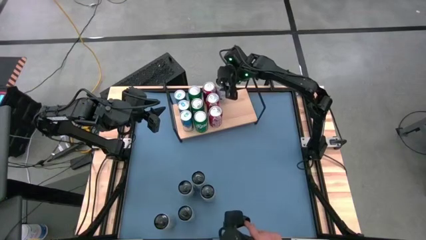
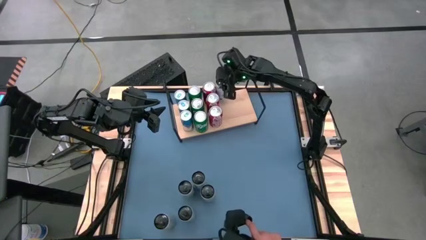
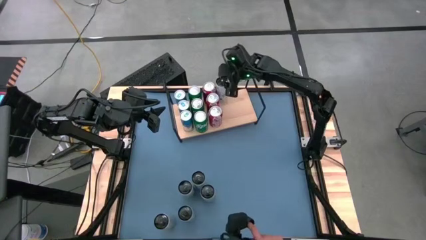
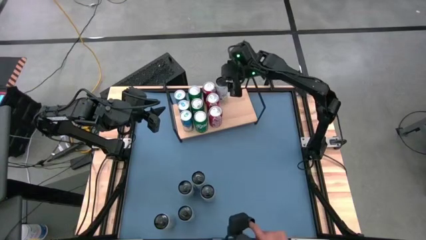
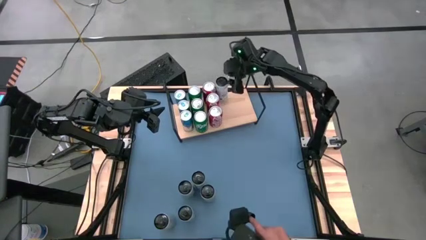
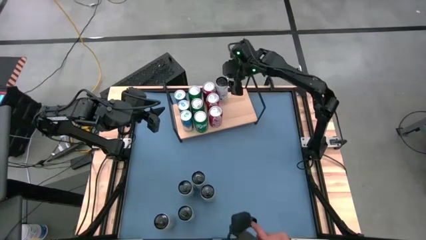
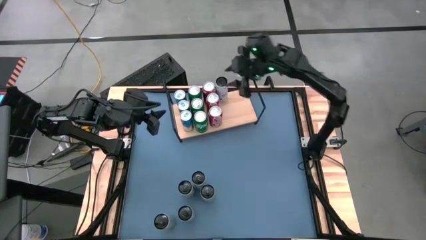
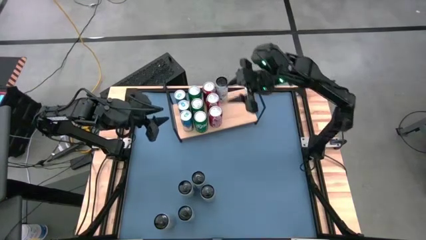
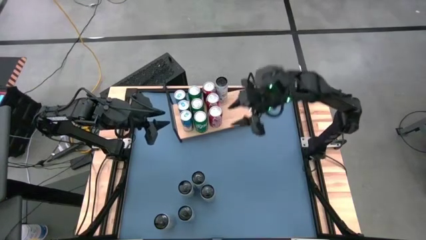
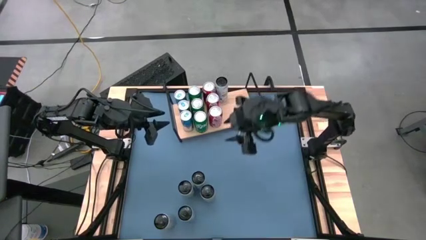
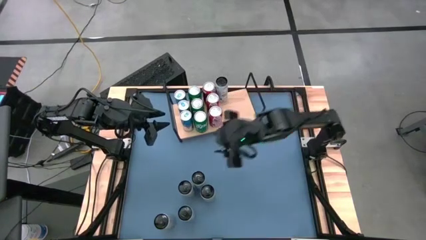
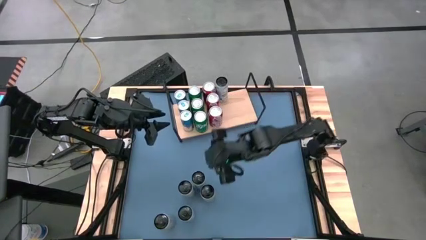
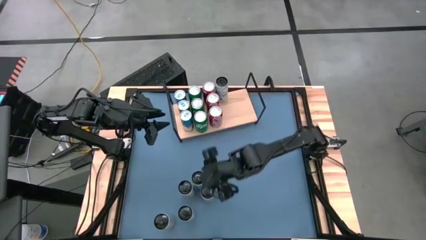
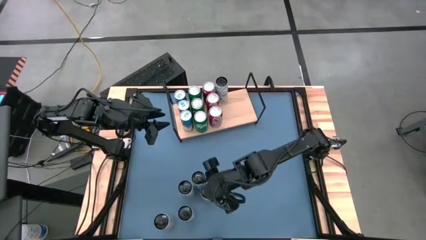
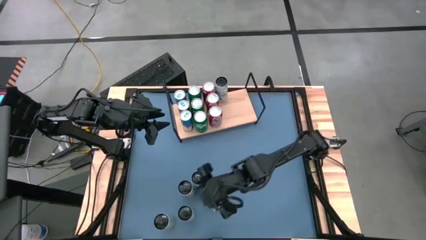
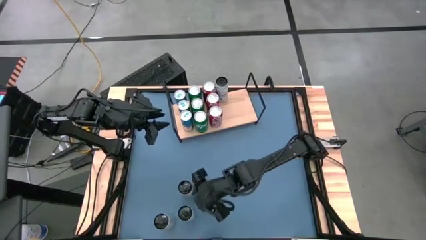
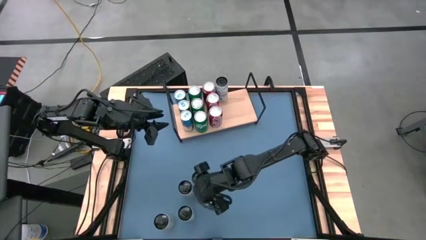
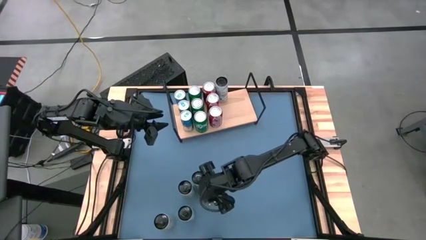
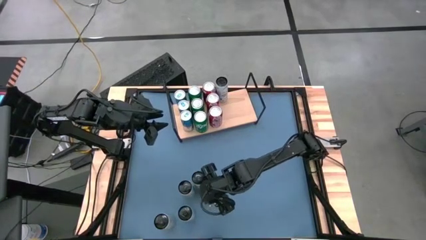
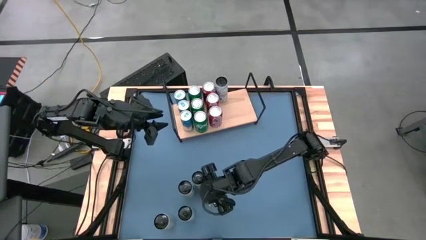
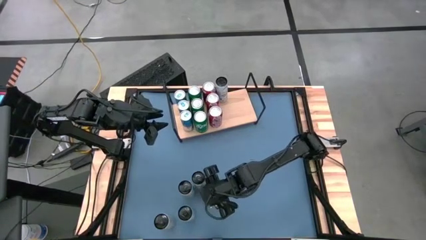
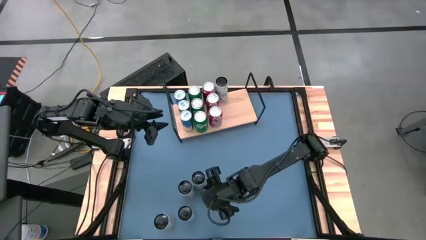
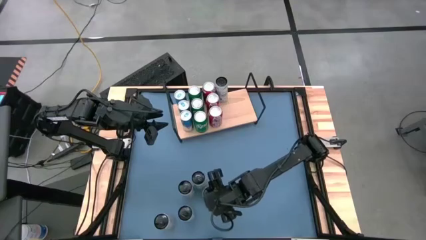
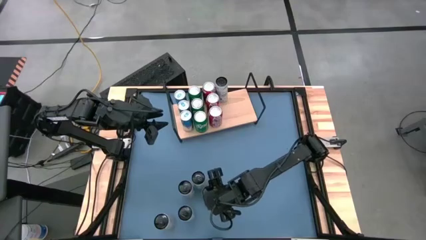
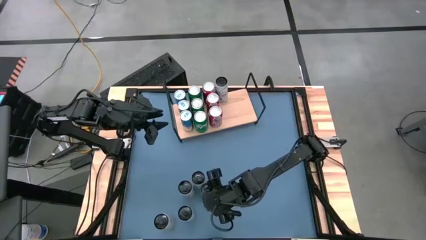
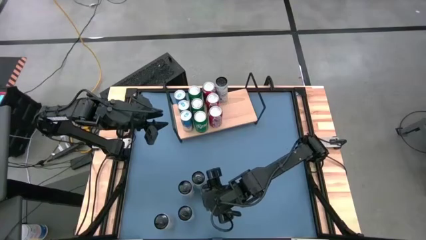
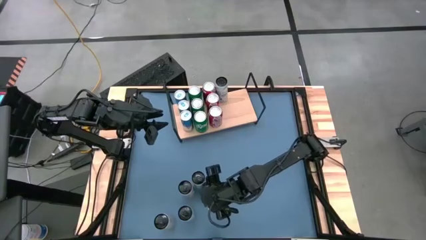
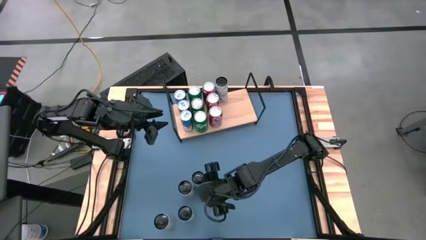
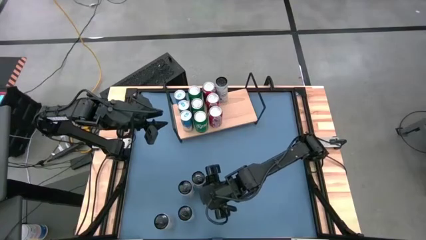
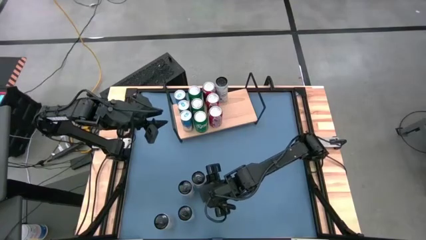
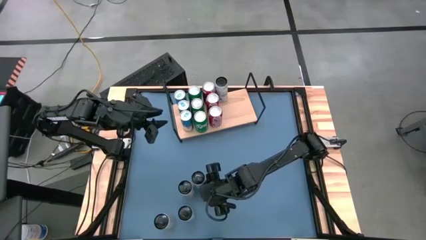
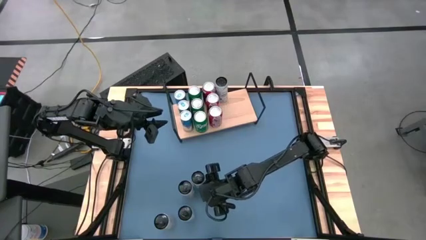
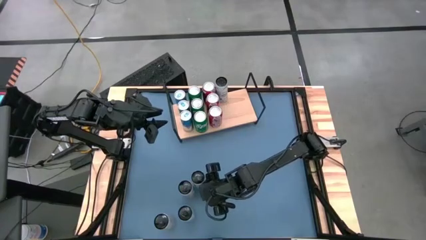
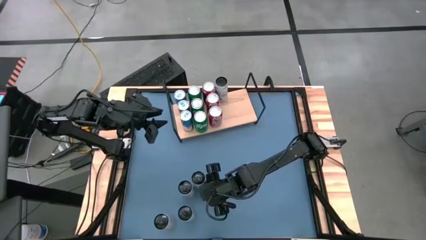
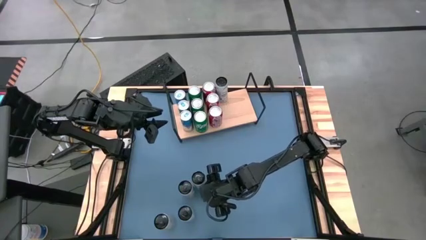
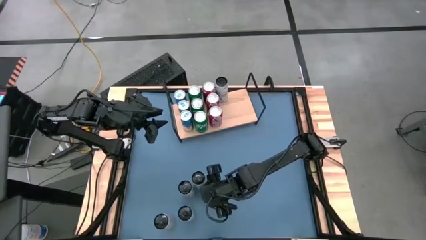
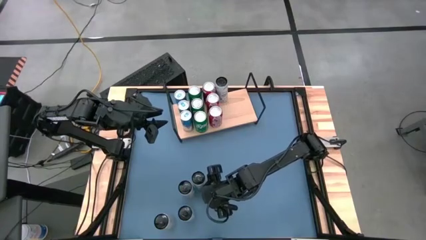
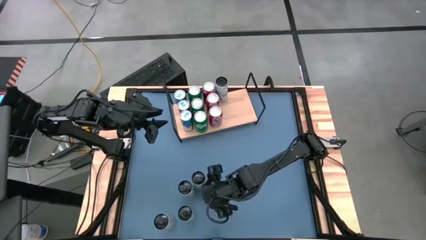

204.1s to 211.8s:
Task: Place canned beverage on shelf
Put the top right white yellow soda can on the shelf

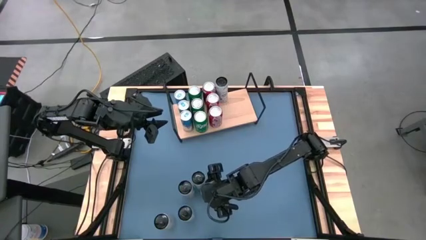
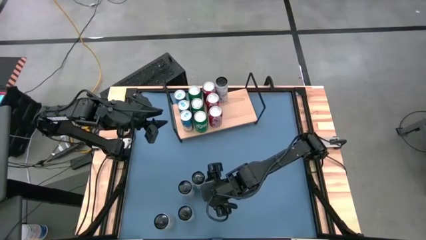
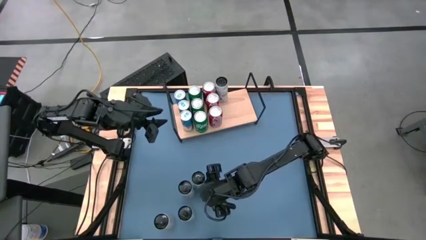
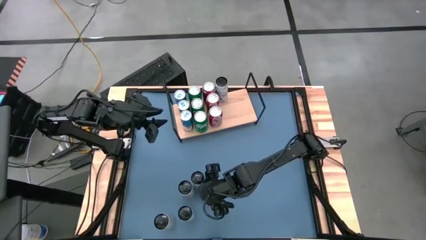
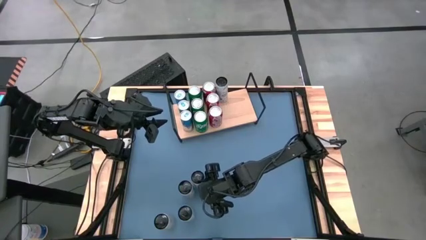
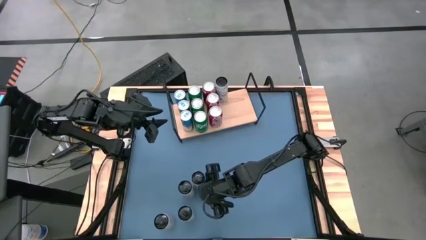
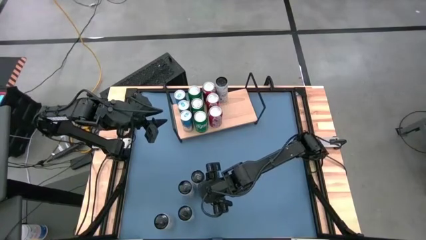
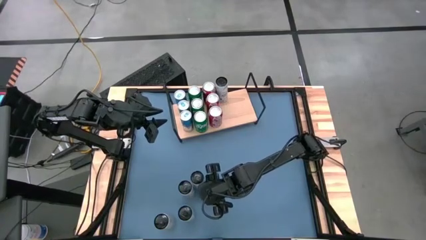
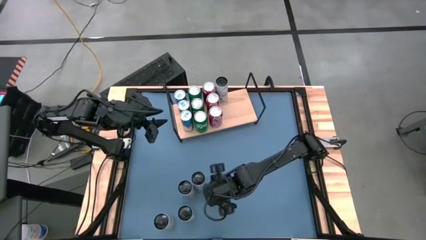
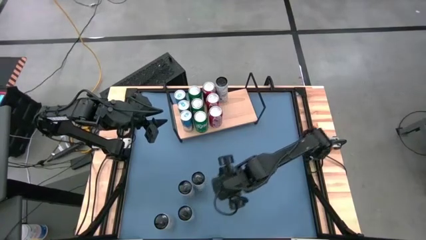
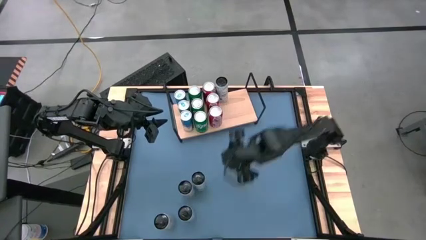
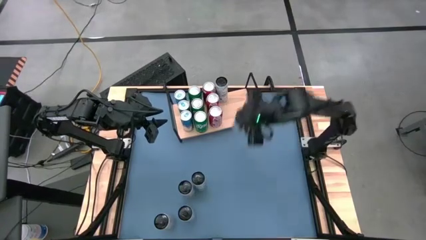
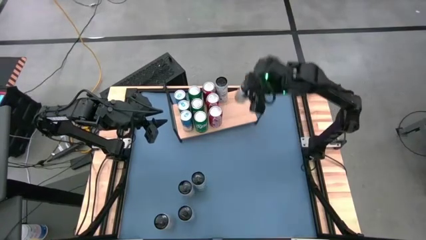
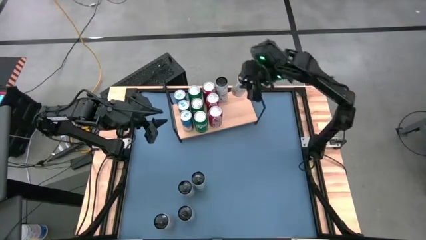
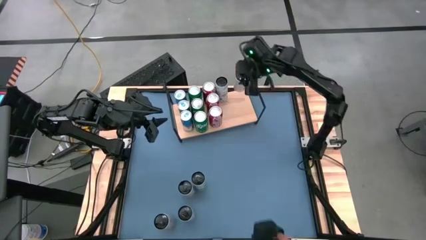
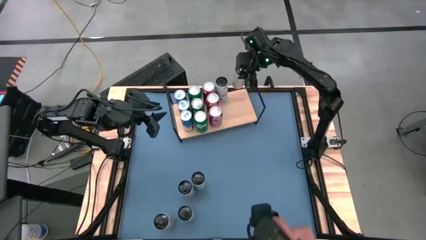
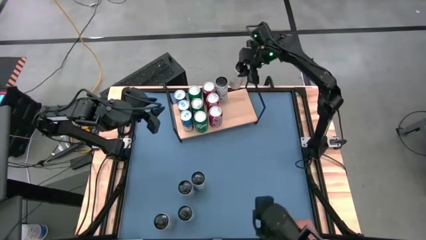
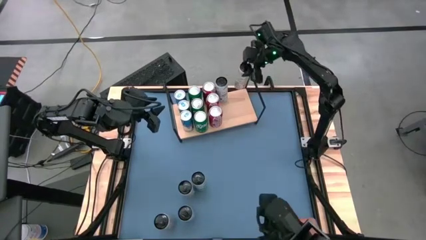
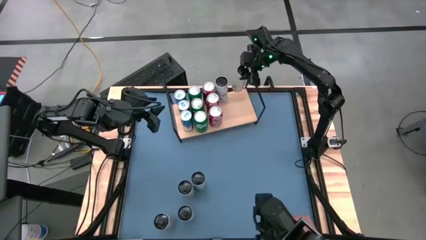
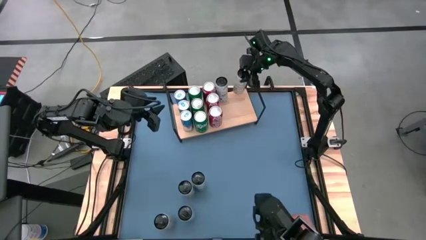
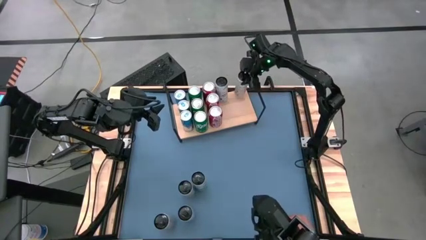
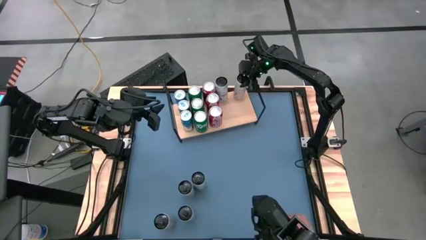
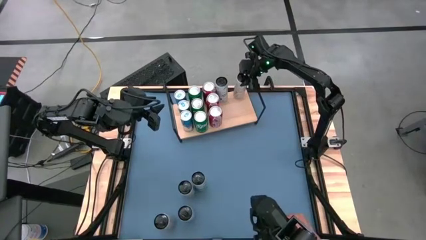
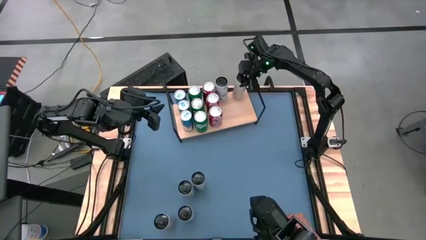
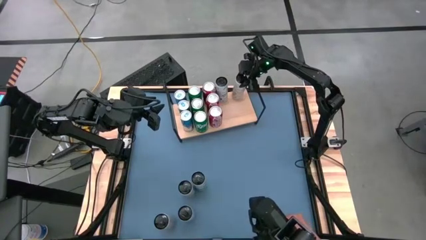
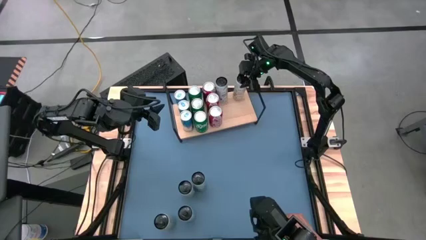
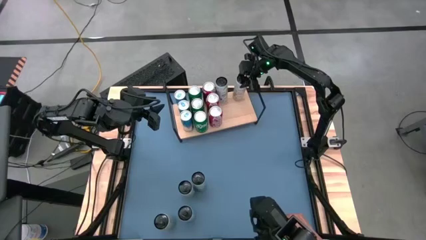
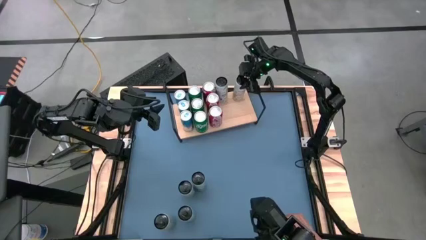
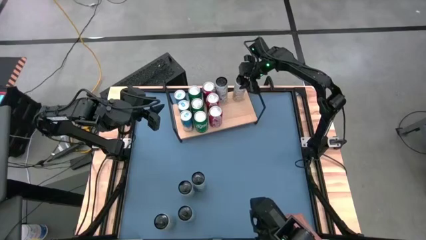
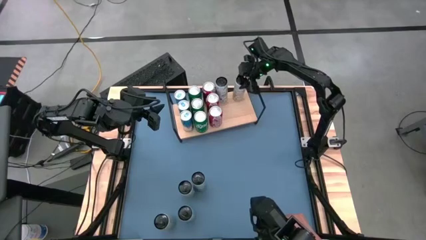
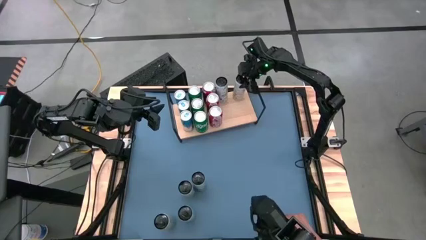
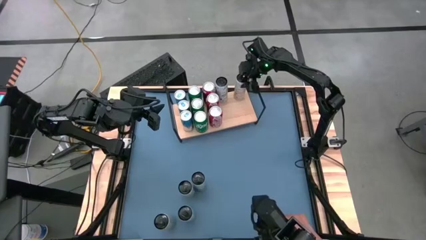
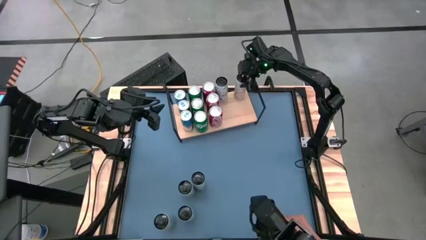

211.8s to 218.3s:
Put the top right white yellow soda can on the shelf
